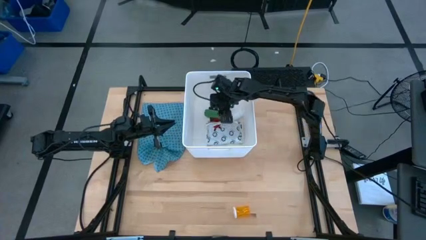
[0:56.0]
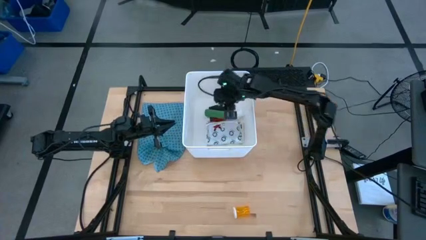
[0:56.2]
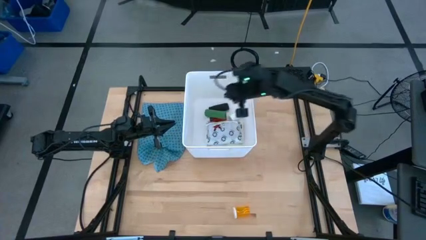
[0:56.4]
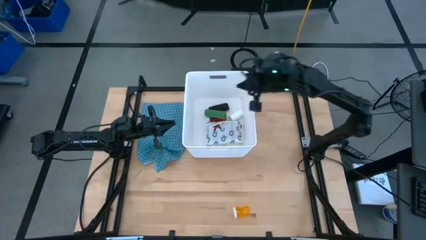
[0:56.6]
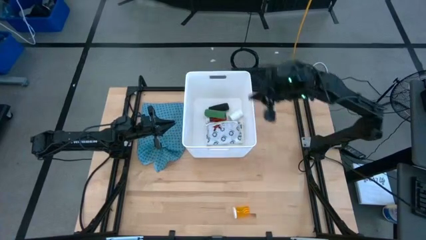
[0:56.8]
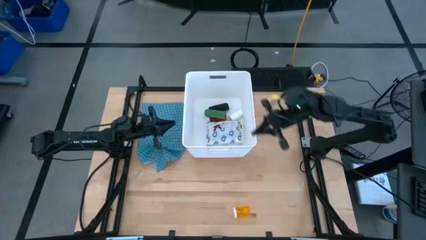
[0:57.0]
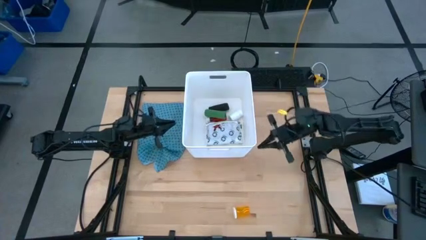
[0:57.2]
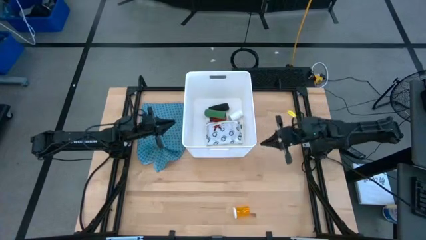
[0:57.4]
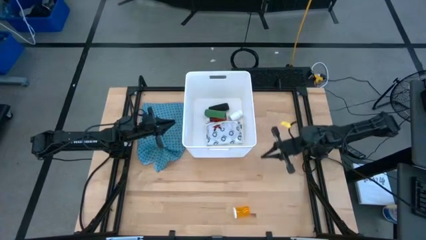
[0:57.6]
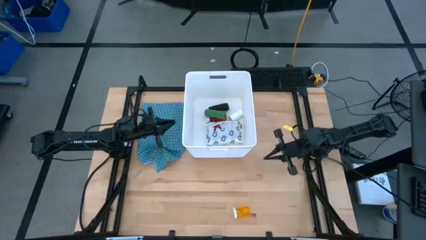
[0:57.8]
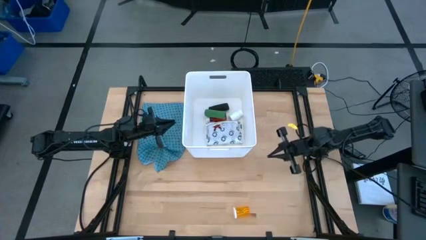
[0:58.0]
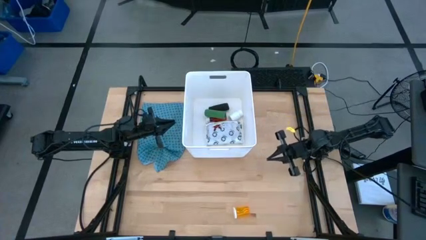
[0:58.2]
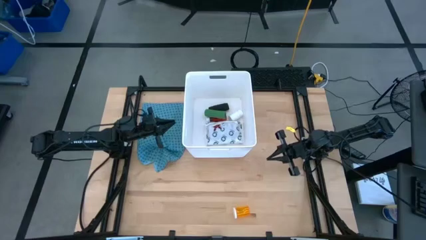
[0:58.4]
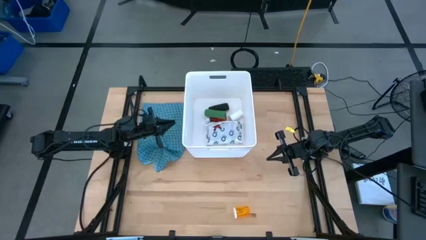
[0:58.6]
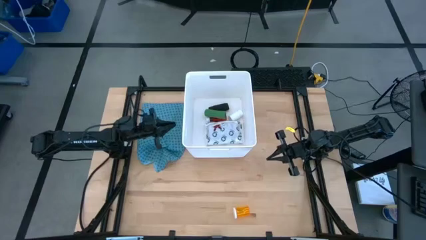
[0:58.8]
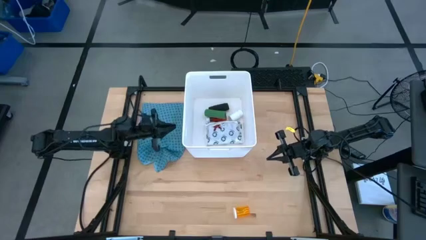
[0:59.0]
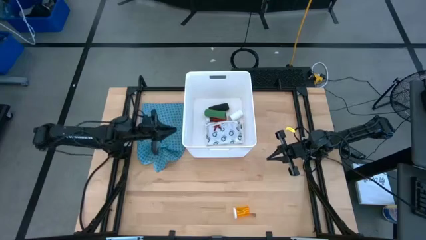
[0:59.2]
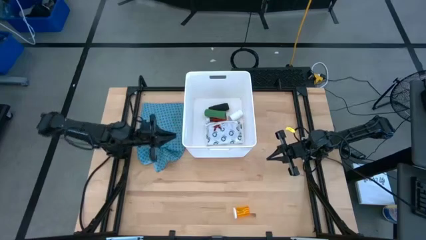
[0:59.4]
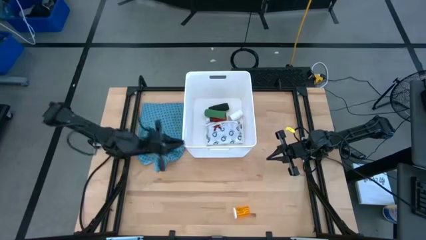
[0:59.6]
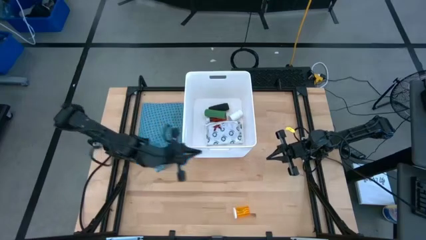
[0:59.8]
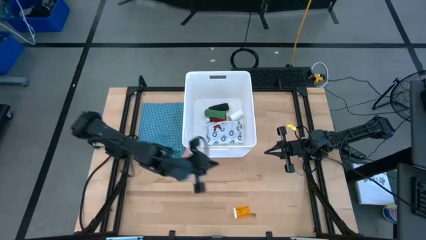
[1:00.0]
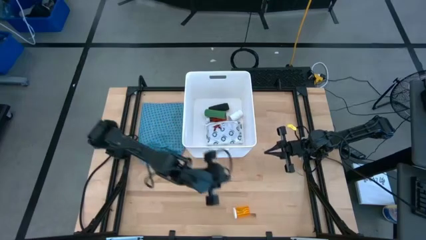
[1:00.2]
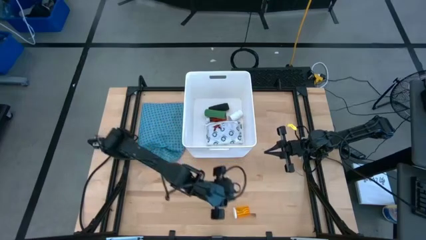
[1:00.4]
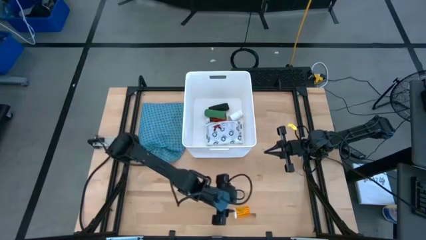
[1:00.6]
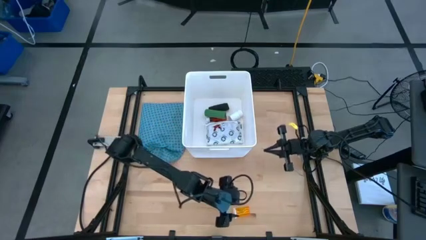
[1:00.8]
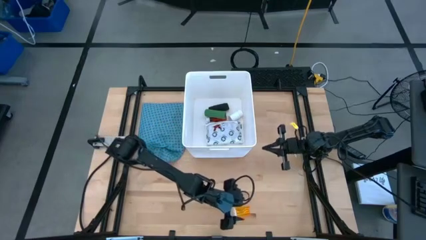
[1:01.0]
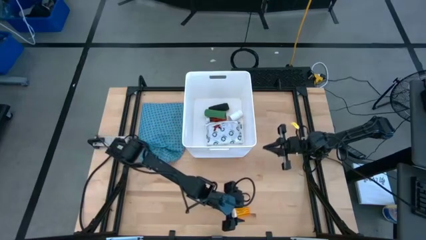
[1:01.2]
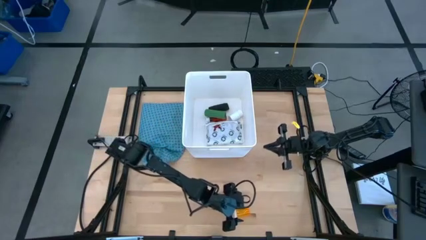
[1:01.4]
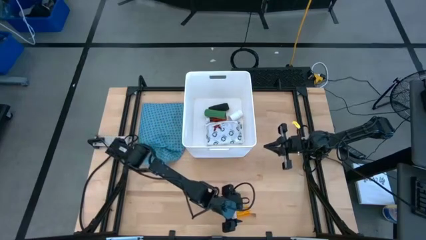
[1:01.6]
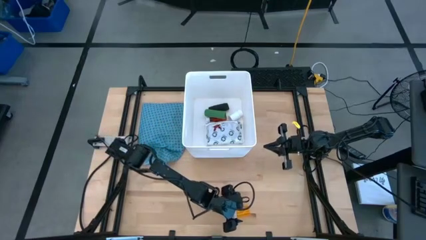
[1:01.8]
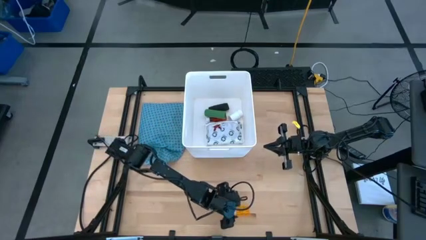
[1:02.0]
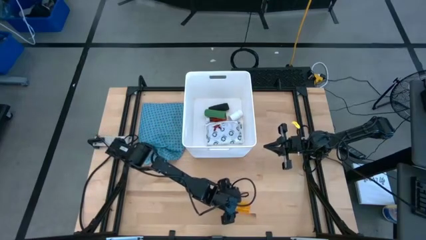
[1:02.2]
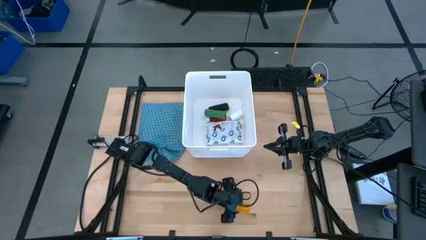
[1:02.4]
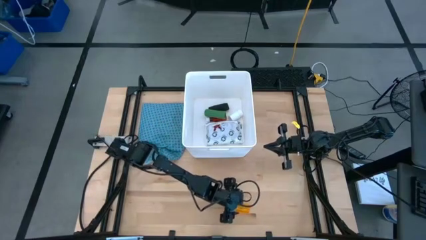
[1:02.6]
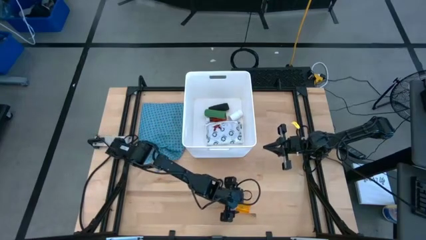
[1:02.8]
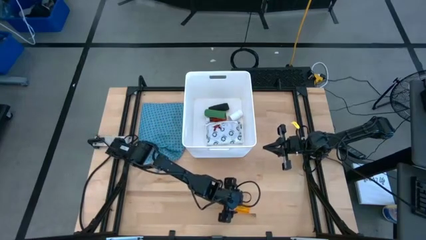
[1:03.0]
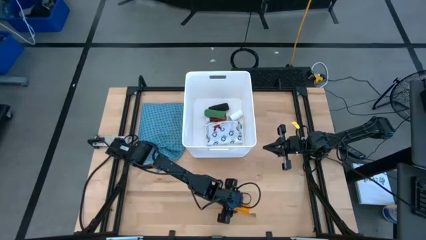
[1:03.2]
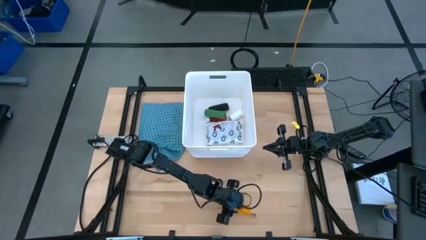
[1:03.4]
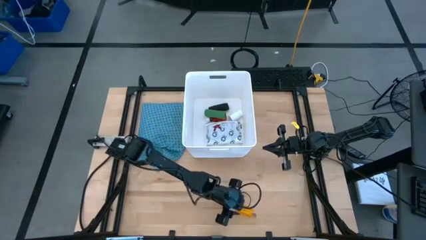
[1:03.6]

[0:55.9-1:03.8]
Task: Pick & place medical supplies in basket/bin
Put the orange pill bottle into the white bin

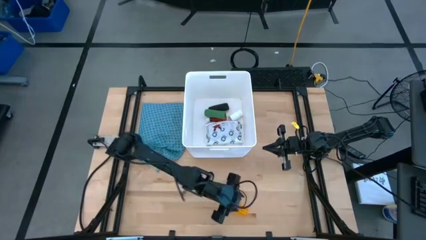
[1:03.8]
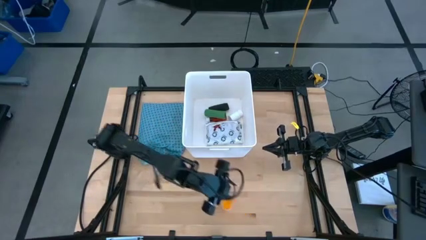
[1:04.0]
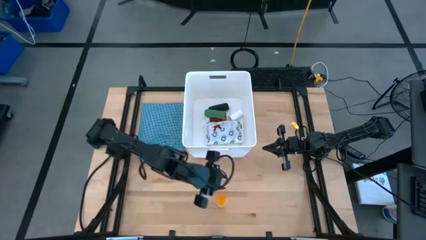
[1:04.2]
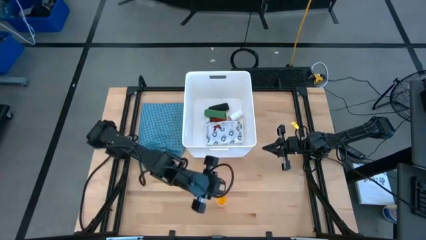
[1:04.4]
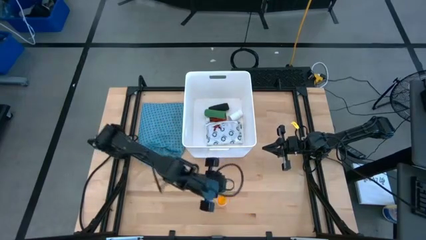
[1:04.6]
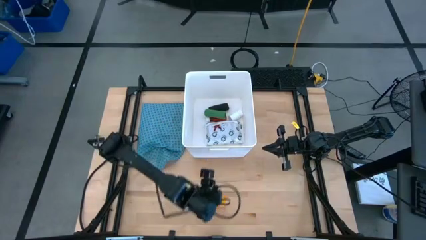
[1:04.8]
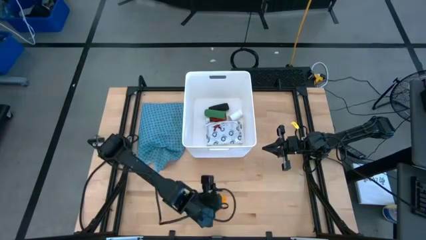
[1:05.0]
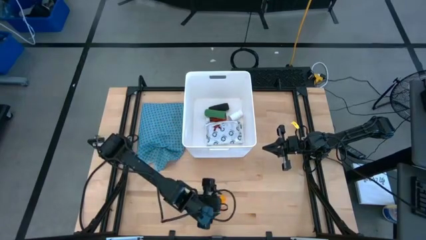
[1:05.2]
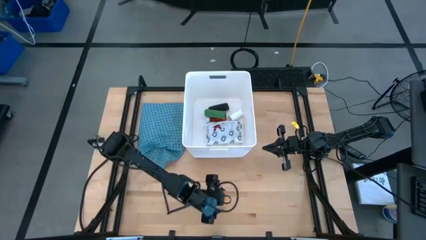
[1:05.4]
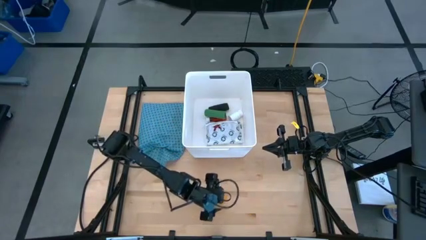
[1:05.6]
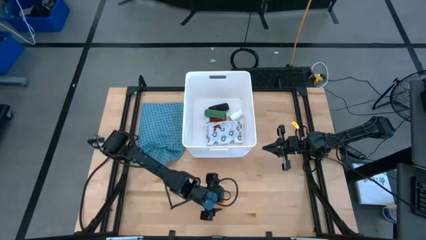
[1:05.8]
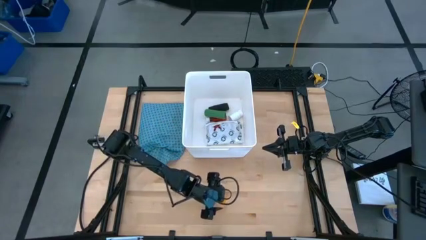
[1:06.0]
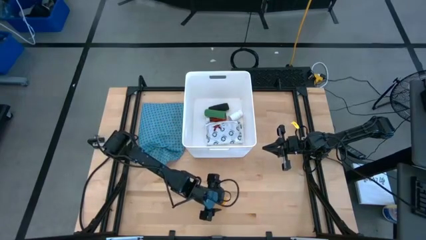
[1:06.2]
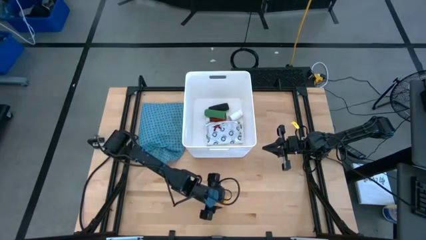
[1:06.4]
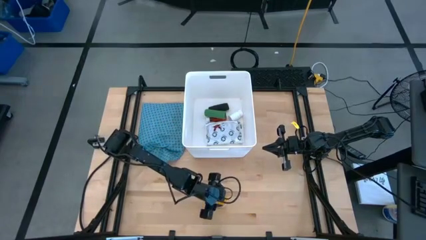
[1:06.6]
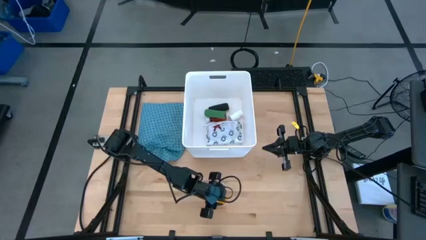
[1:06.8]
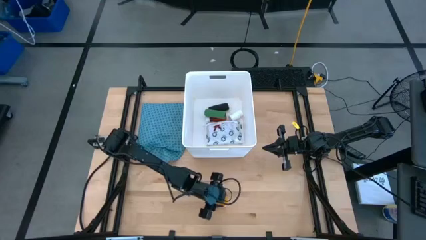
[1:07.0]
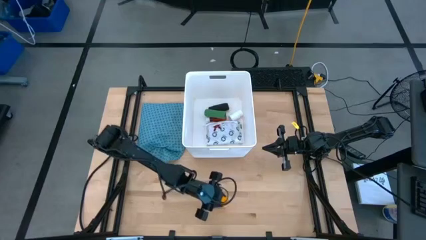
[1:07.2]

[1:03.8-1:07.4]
Put the orange pill bottle into the white bin

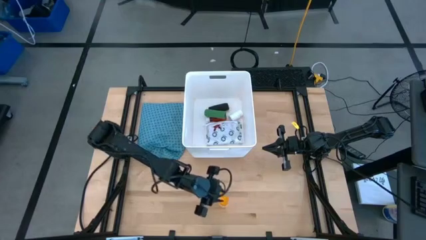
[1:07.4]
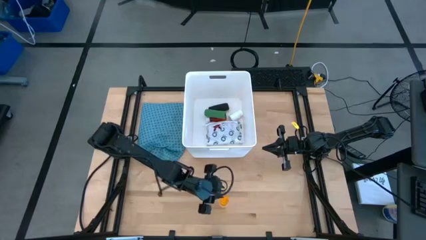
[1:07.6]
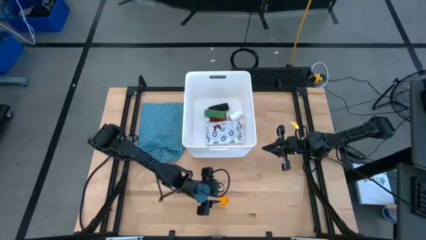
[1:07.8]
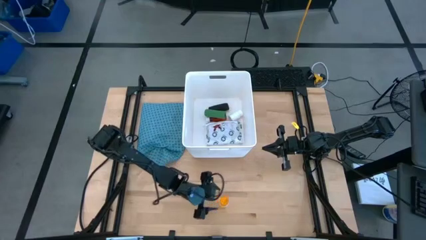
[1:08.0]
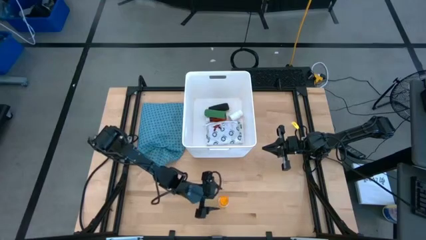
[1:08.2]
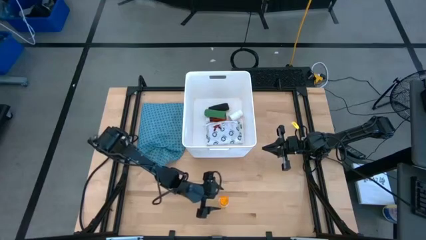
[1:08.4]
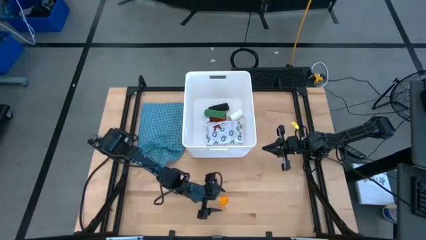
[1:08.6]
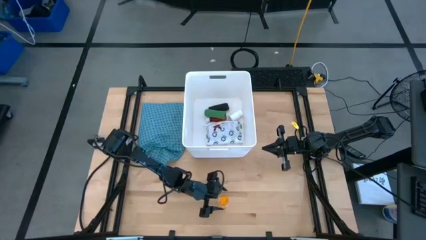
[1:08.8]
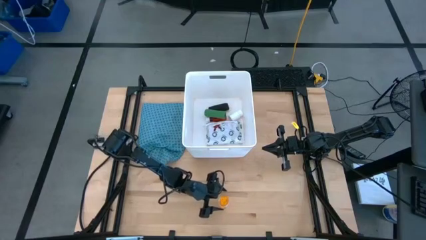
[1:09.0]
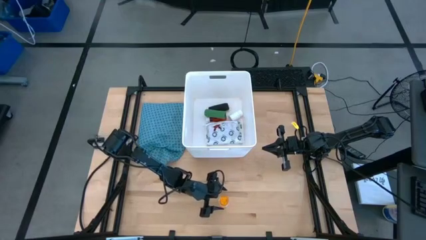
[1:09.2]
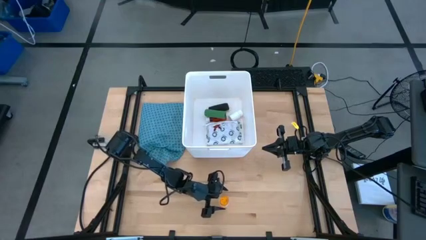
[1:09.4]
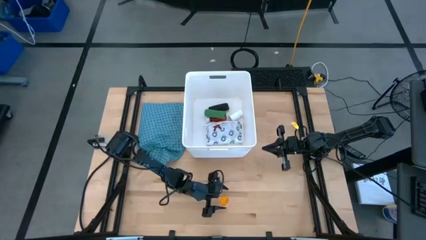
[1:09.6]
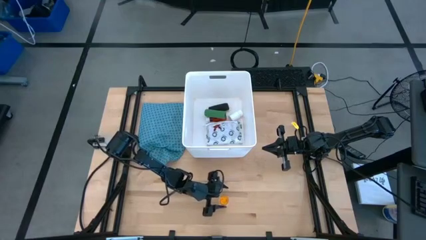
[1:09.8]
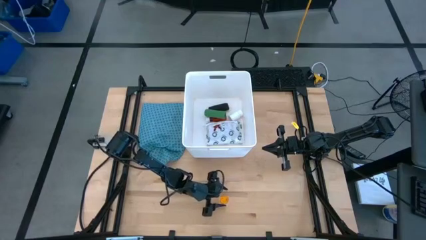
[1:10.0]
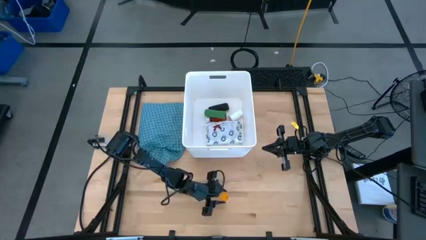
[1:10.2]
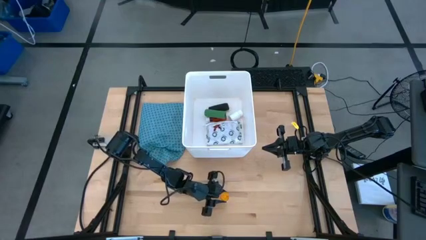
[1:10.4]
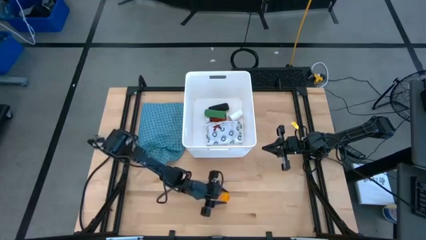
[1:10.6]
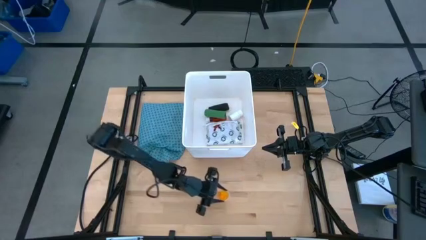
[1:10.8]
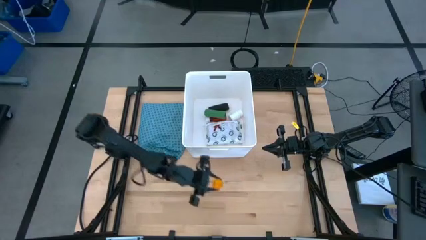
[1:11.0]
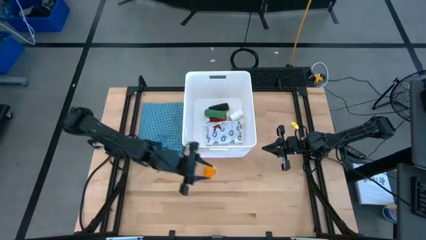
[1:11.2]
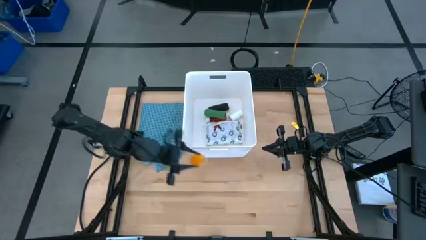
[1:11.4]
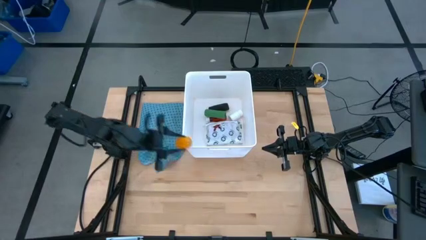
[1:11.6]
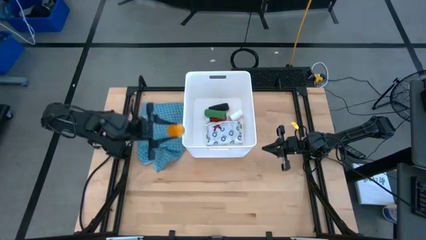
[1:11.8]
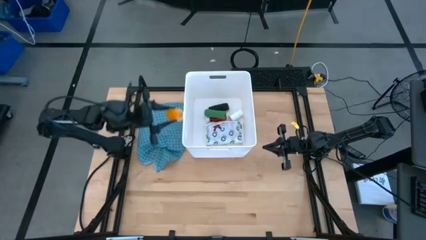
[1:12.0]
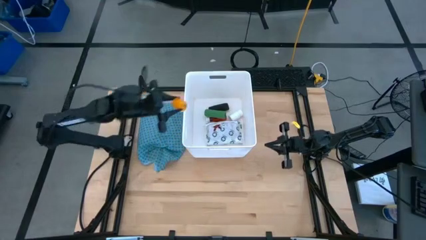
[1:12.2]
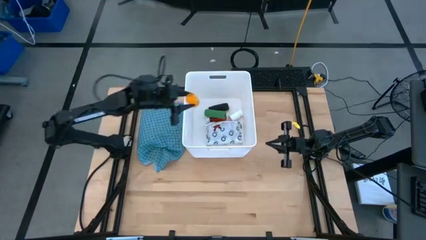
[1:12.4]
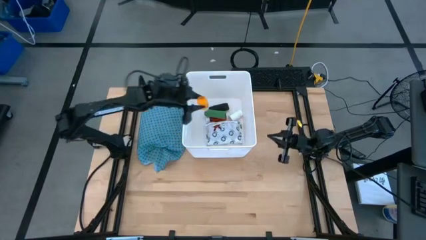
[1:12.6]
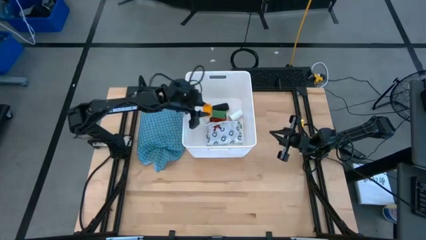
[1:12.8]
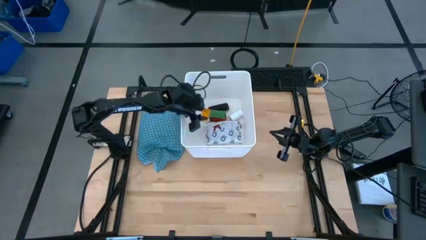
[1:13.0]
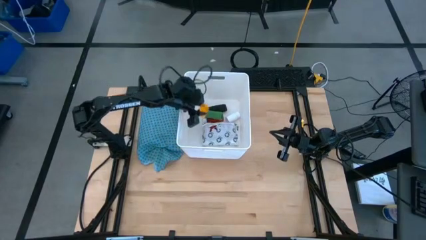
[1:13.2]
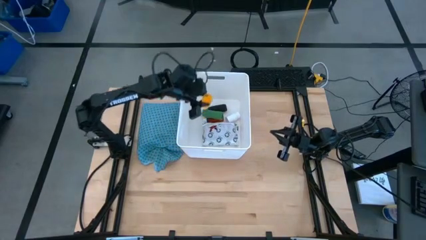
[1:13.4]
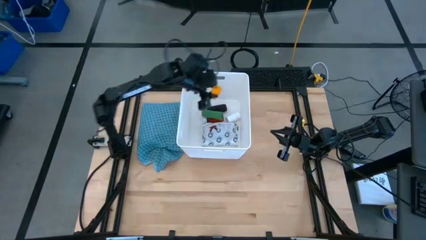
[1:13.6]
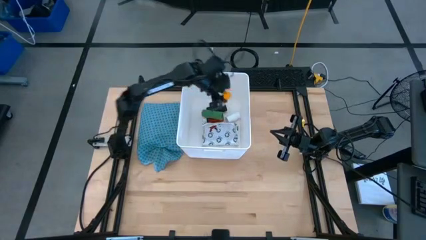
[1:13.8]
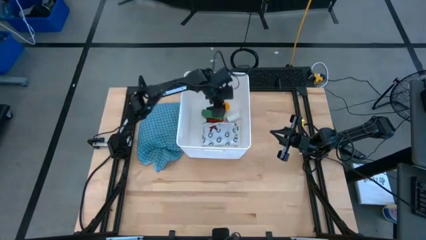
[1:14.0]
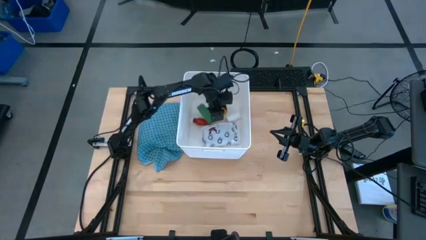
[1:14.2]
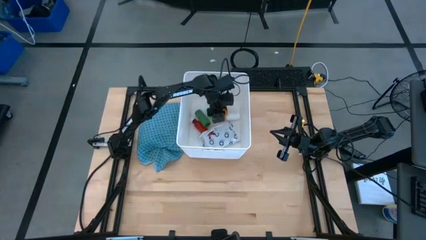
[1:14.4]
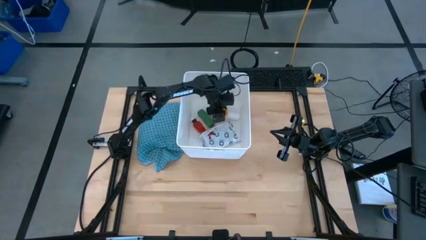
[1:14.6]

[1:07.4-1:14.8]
Put the orange pill bottle into the white bin
